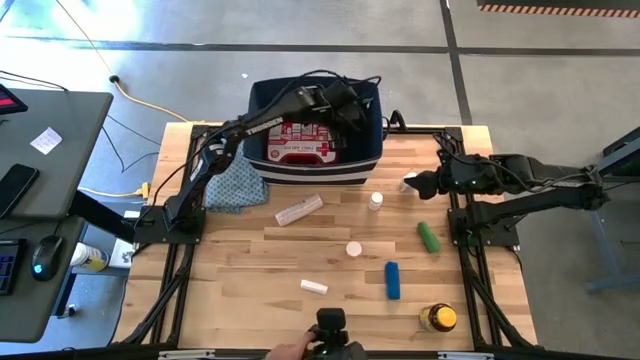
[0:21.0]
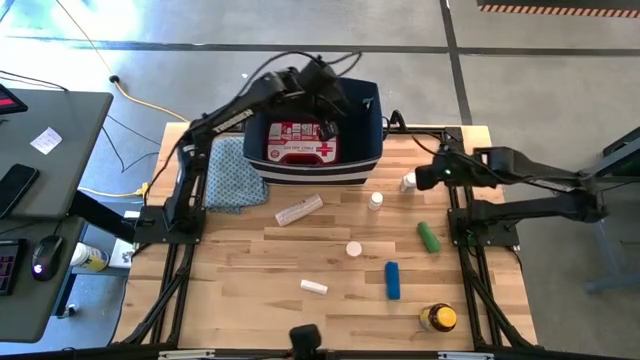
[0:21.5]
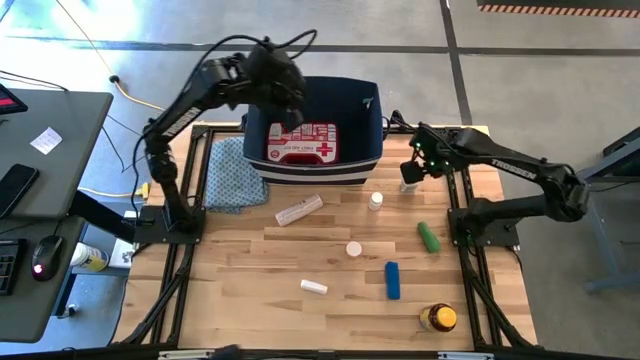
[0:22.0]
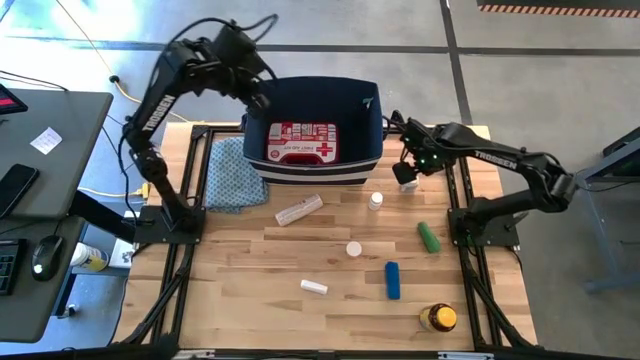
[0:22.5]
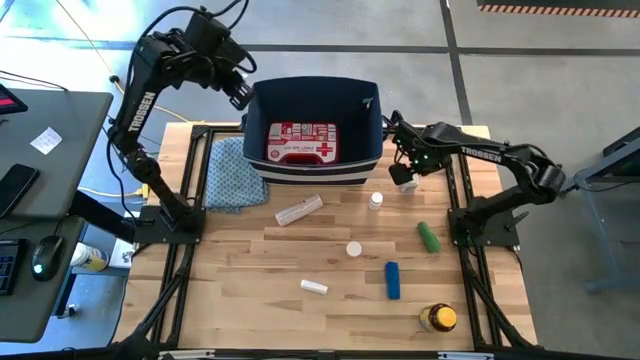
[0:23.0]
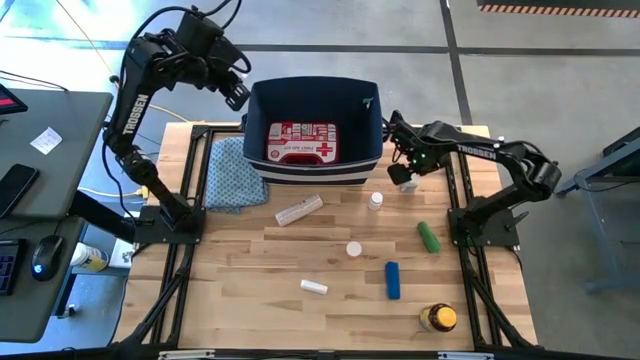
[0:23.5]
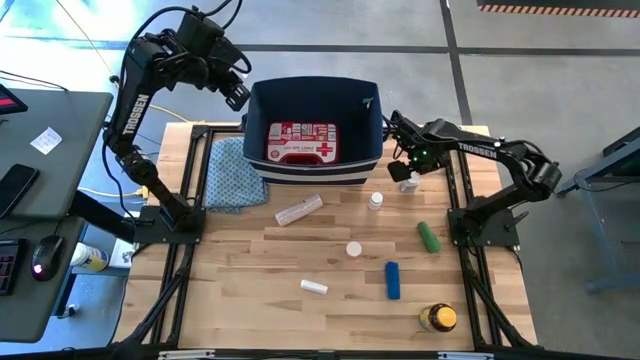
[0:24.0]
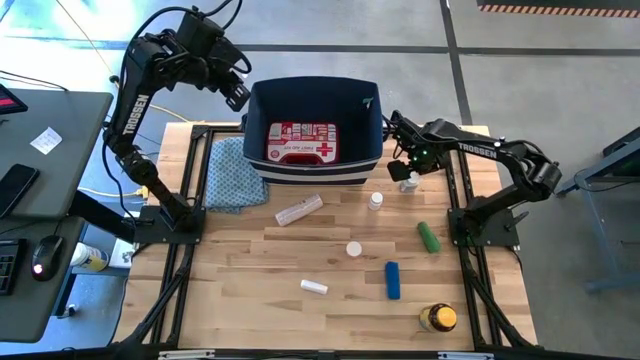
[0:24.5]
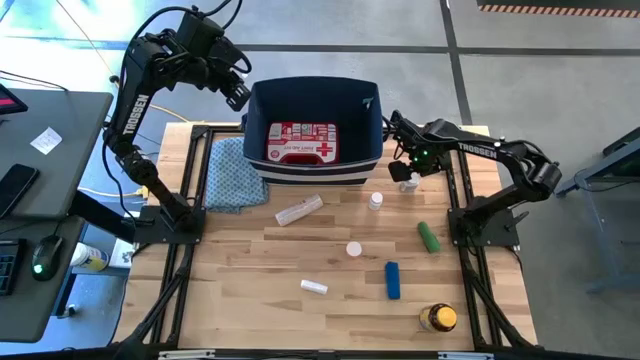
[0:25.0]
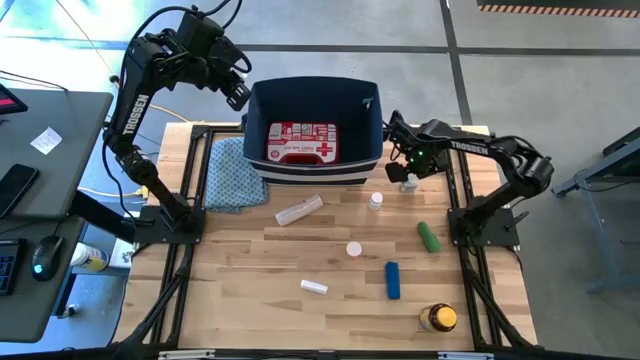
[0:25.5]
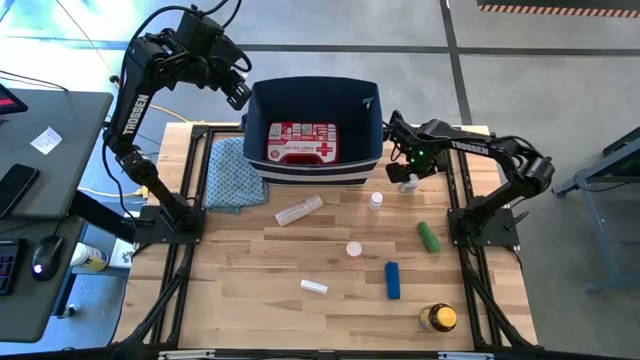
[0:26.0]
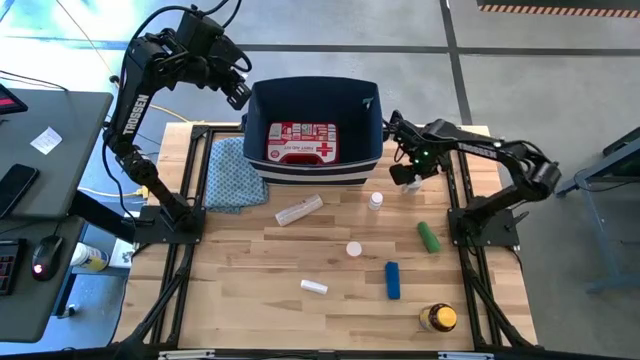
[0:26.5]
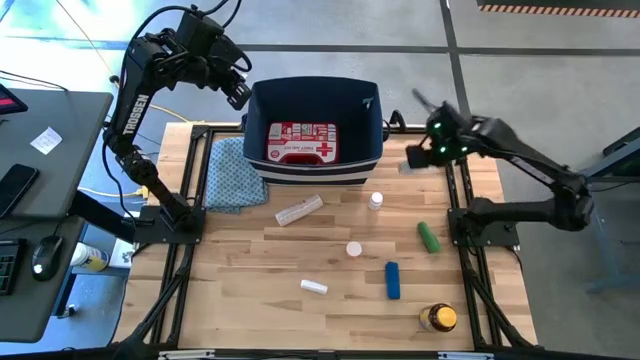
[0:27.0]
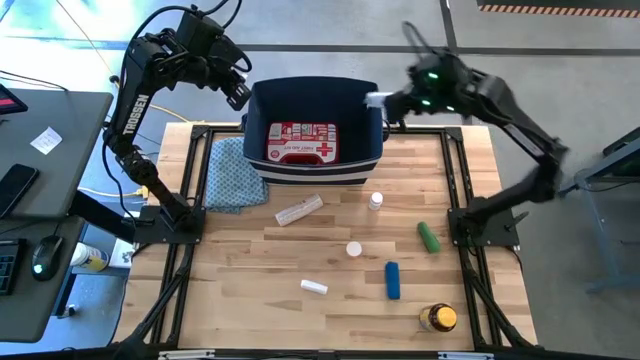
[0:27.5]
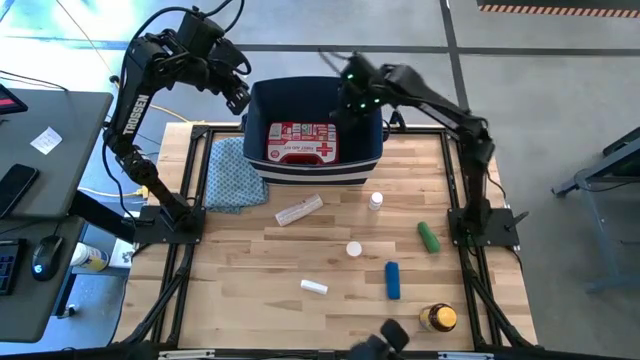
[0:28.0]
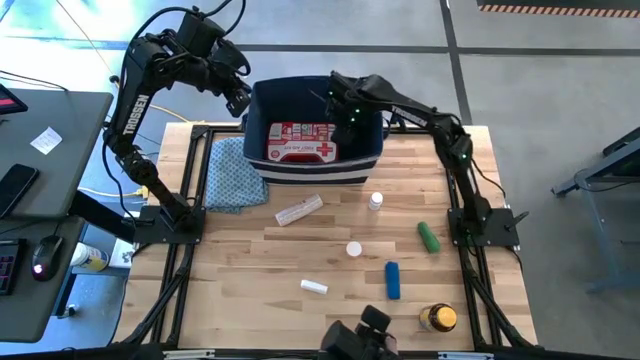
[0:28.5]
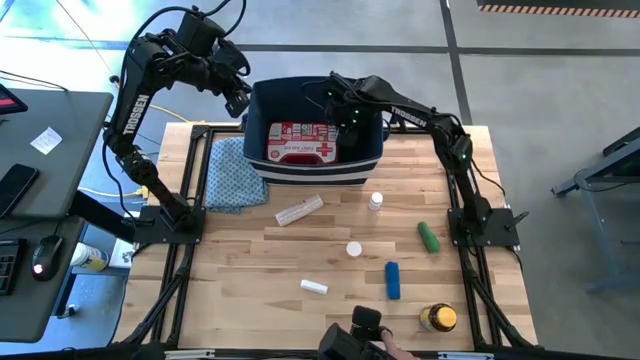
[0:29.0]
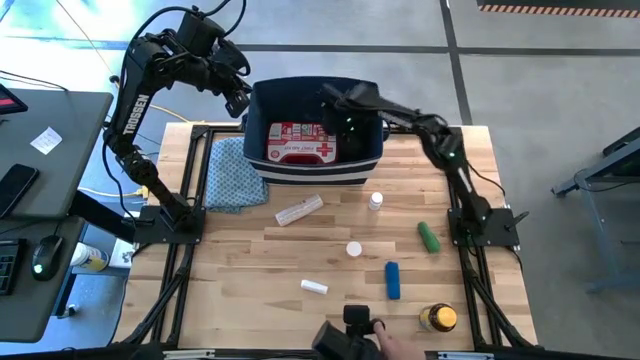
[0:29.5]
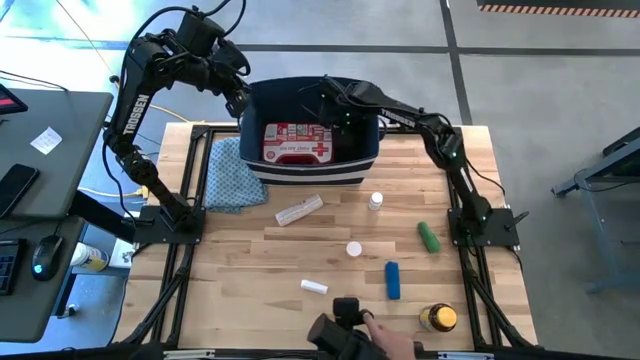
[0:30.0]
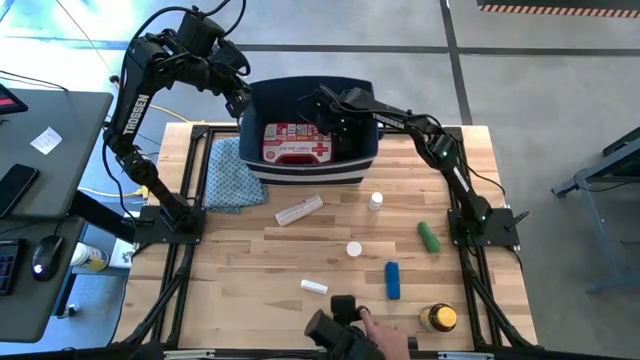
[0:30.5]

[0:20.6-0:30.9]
Task: Pick & place medical supplies in basket/bin
Put the blue medicine bottle into the blue bin

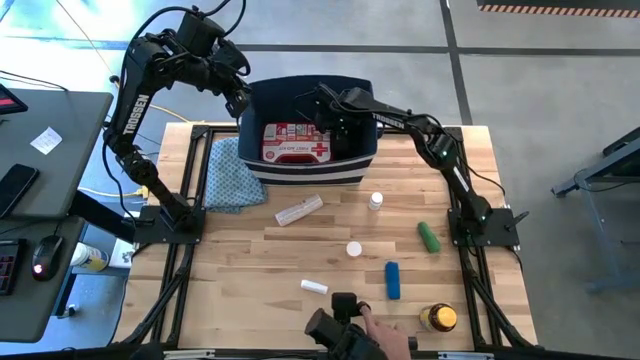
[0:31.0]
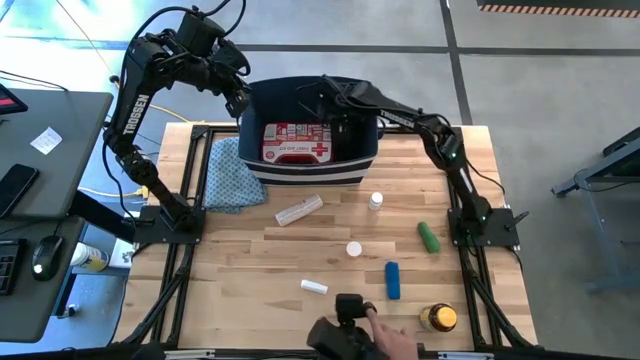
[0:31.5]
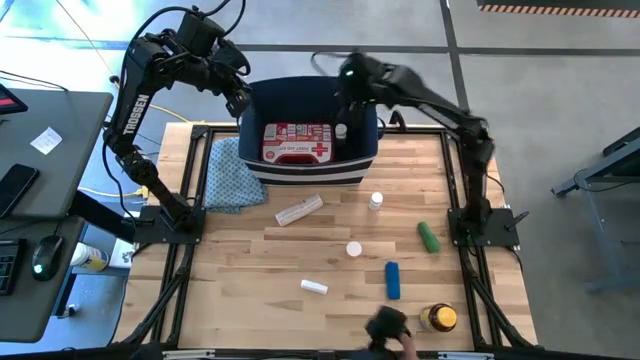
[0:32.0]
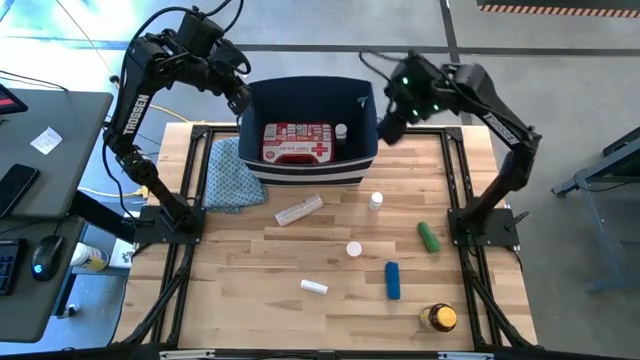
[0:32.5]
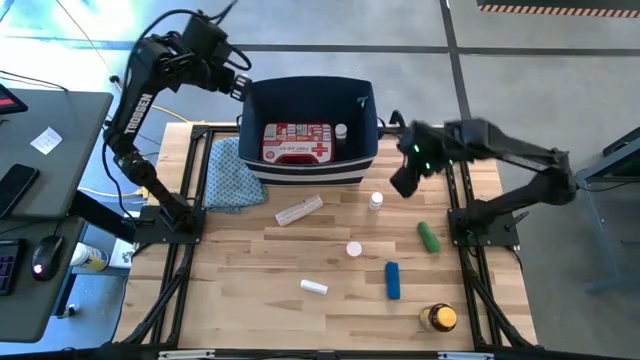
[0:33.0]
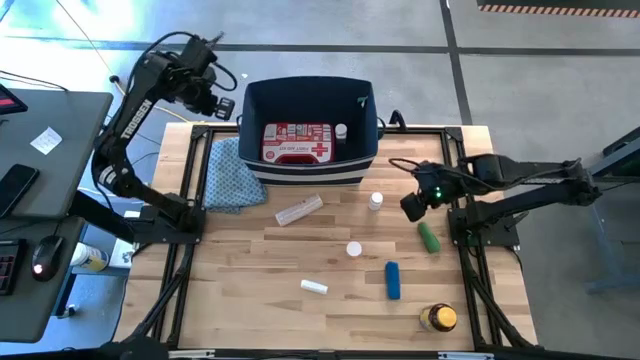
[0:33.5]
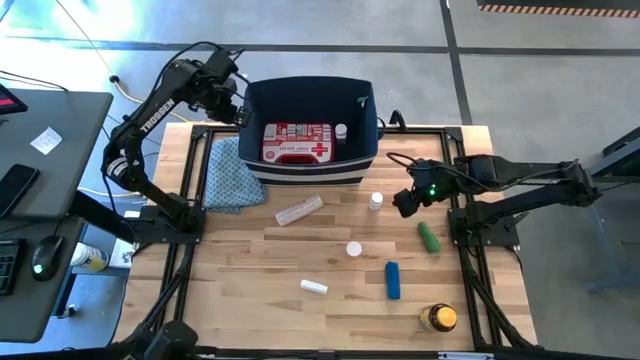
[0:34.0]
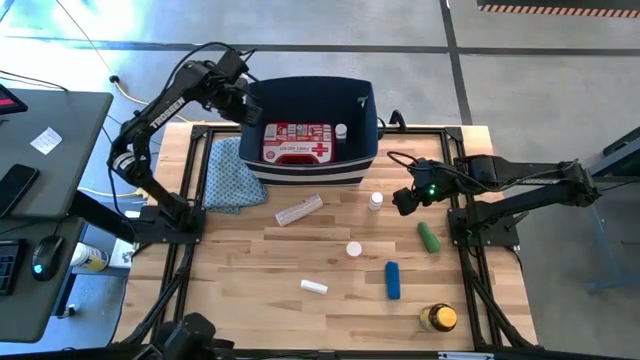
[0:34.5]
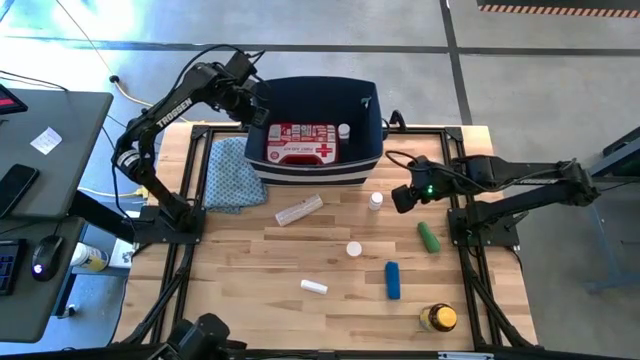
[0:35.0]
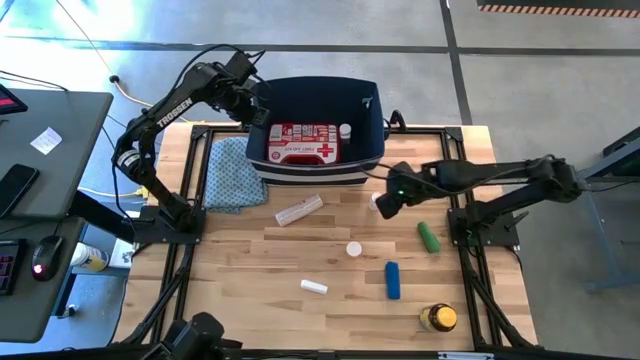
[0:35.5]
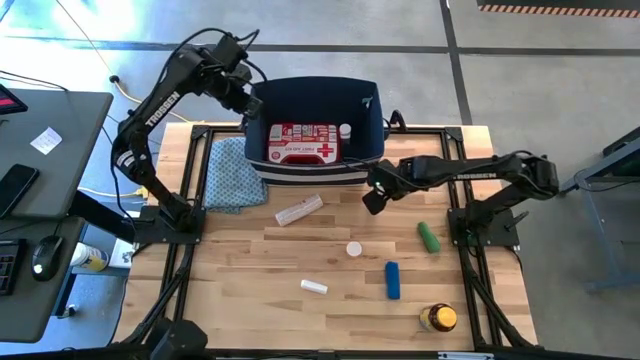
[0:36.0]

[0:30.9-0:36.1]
Adjust the blue bin

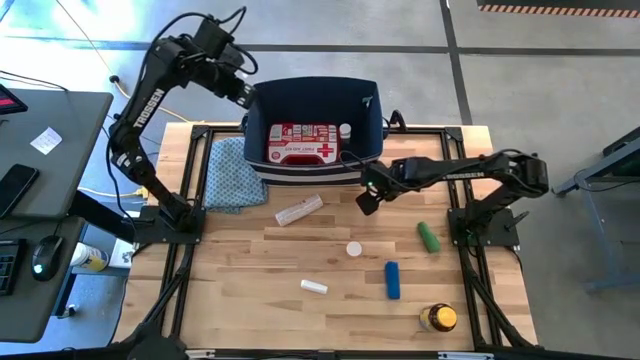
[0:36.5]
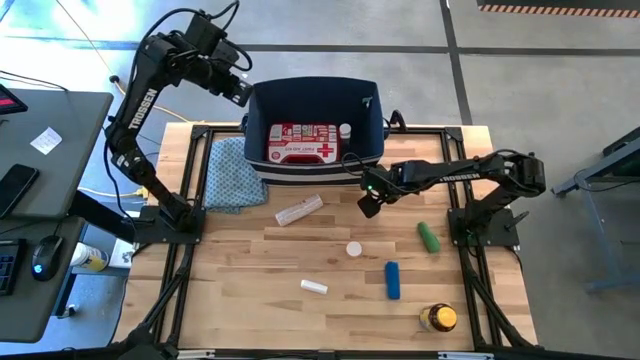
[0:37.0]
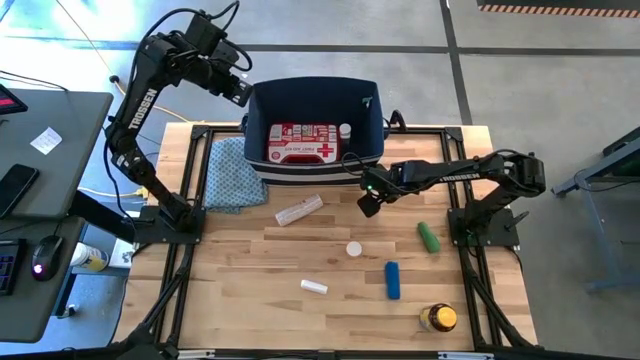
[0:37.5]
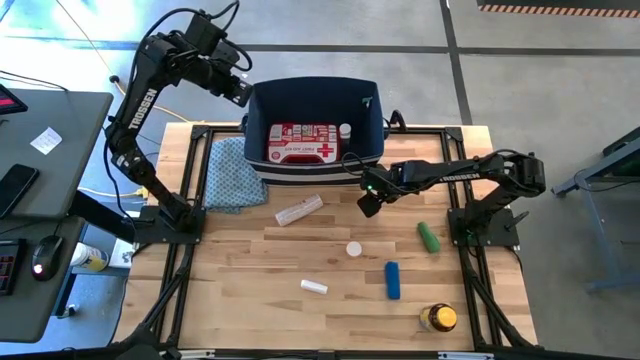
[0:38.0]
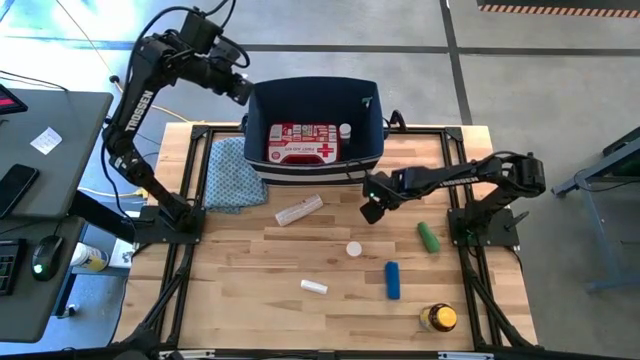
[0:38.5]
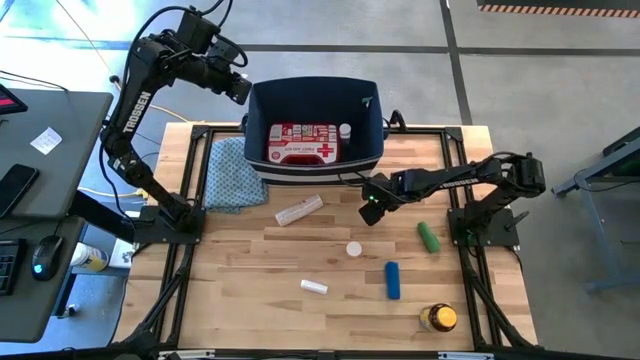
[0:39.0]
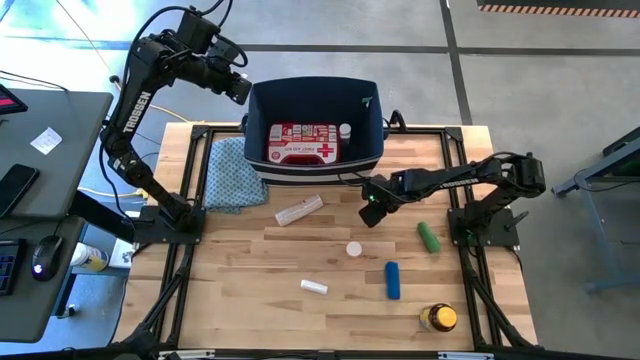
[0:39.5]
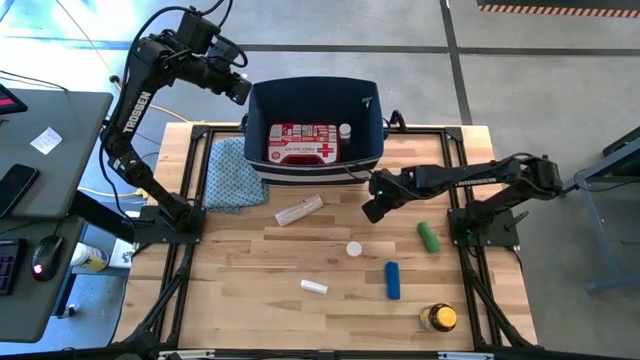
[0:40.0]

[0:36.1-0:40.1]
Put the white medicine bottle into the blue bin

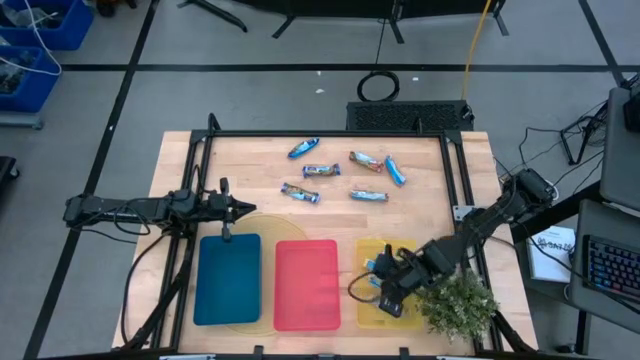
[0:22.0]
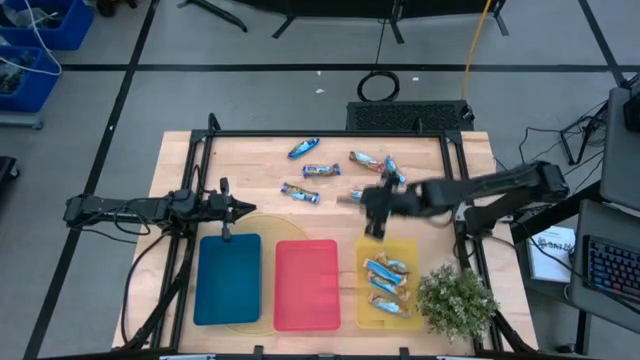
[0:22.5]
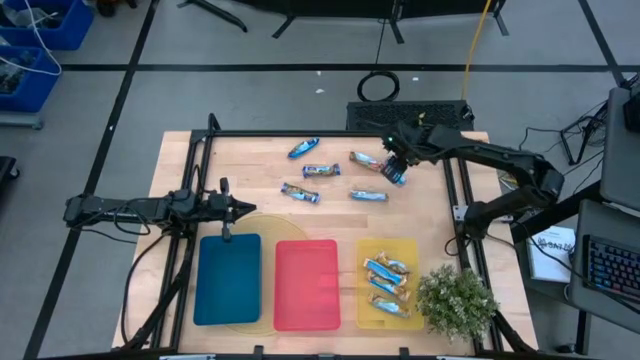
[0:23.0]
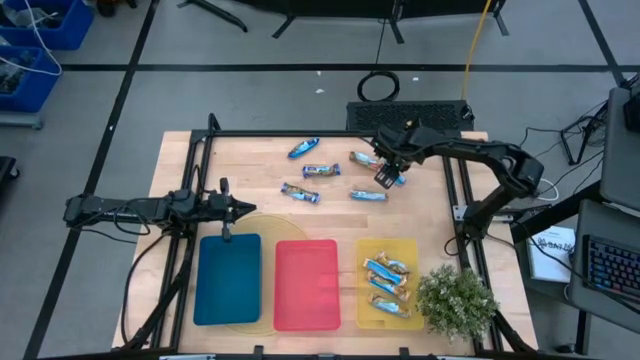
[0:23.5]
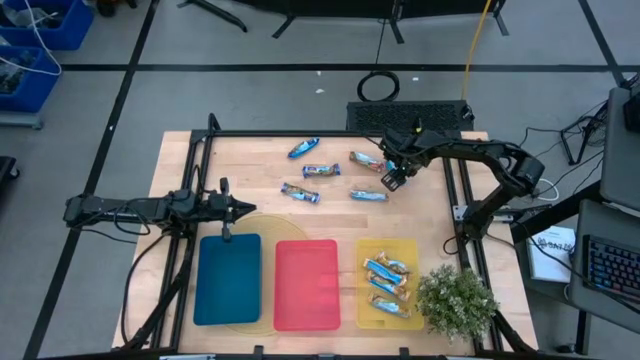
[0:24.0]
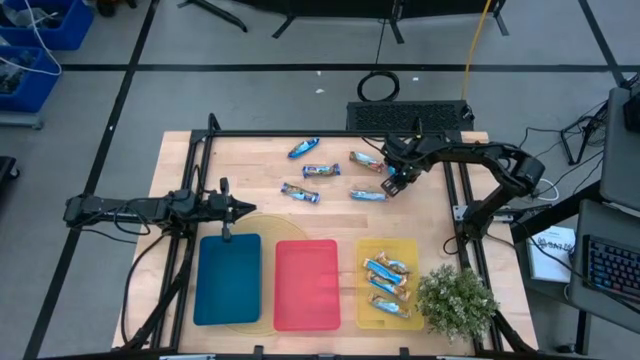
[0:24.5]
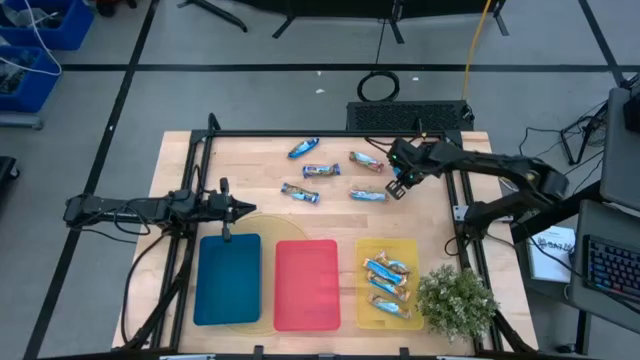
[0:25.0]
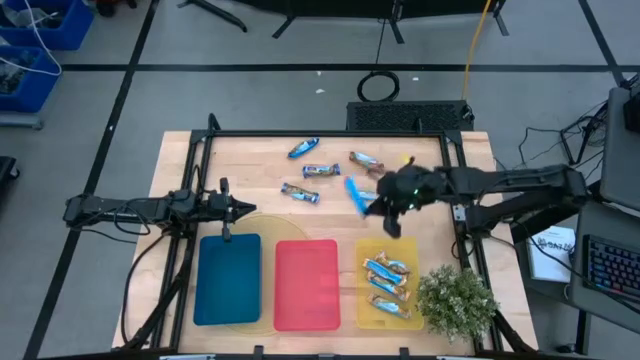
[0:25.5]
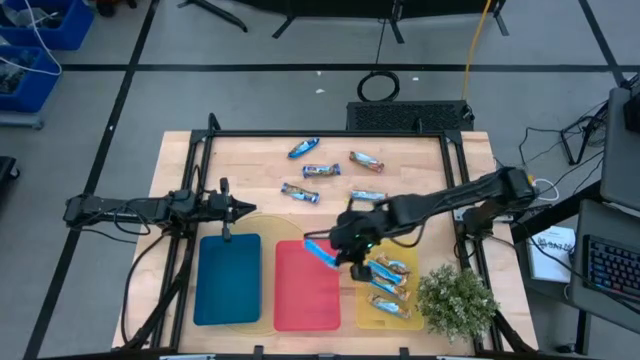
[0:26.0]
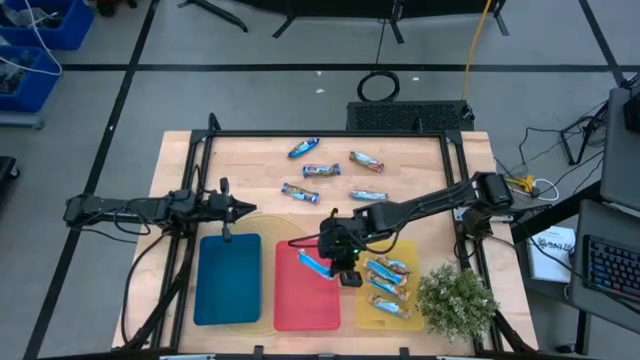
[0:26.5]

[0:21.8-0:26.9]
Task: Pick and place Granola Bars by type
Put the middle right green granola bar into the pink bin
